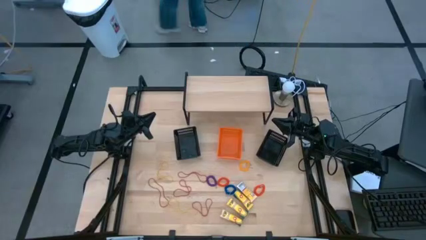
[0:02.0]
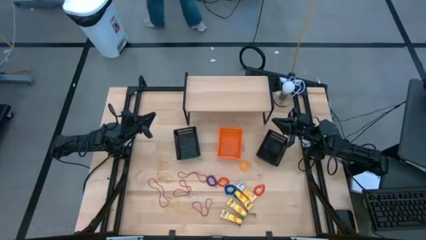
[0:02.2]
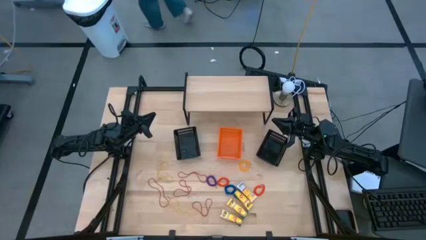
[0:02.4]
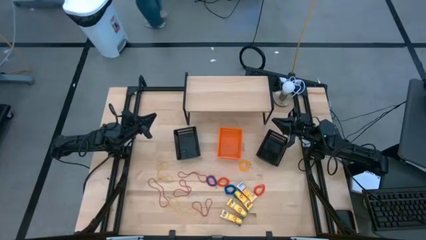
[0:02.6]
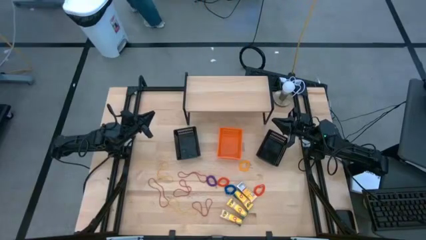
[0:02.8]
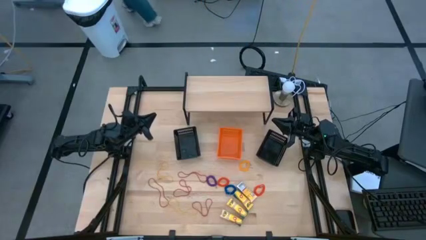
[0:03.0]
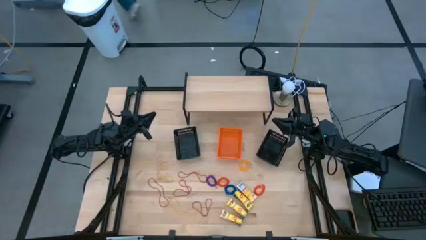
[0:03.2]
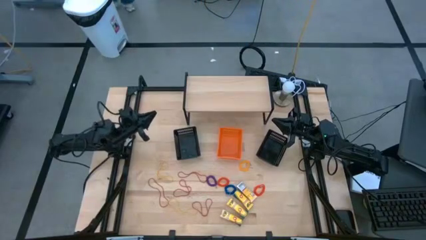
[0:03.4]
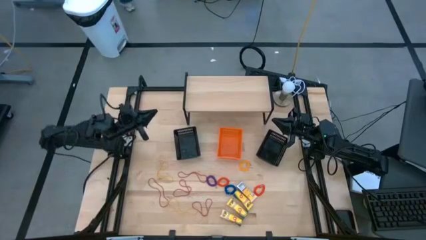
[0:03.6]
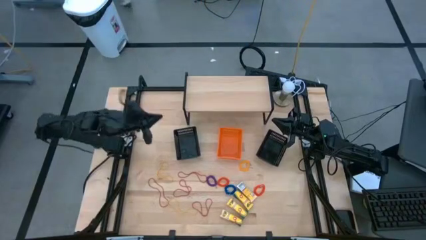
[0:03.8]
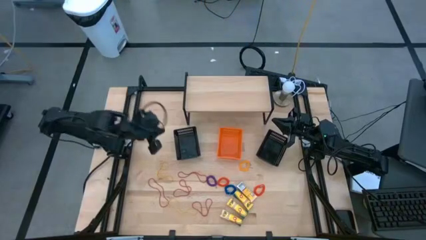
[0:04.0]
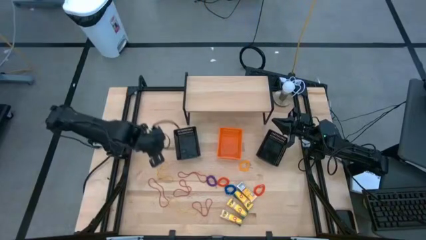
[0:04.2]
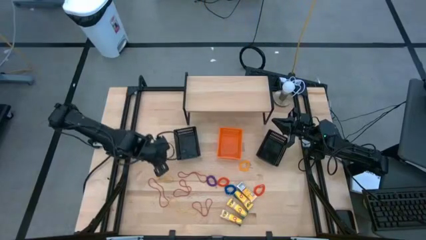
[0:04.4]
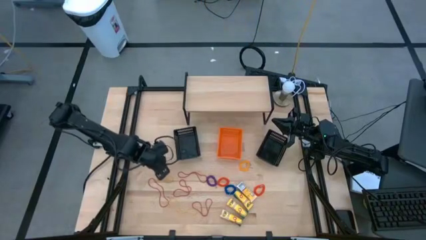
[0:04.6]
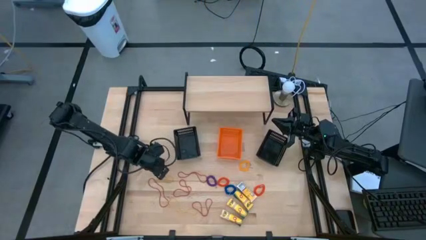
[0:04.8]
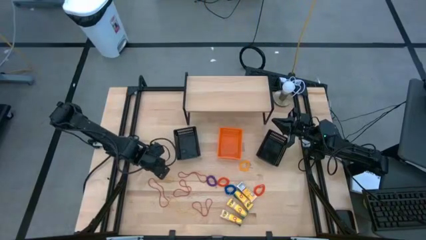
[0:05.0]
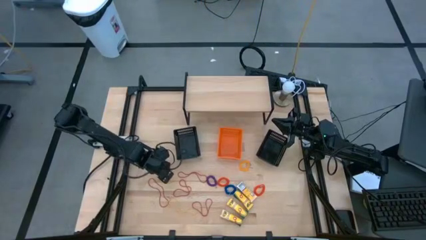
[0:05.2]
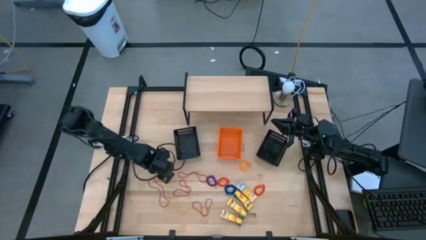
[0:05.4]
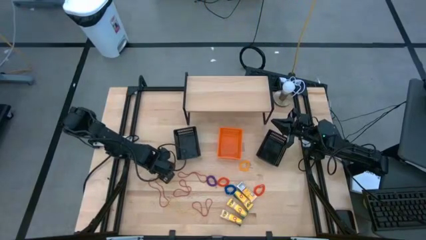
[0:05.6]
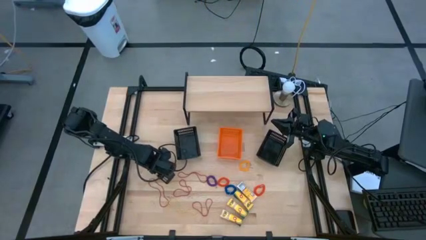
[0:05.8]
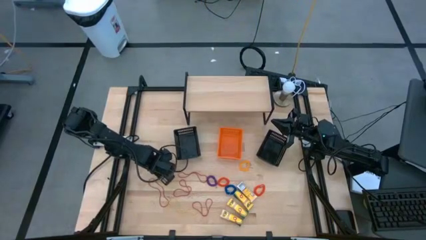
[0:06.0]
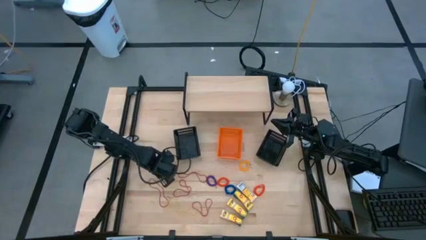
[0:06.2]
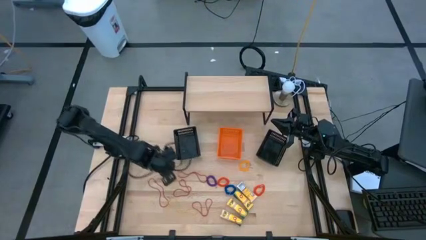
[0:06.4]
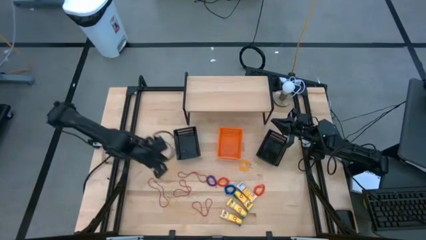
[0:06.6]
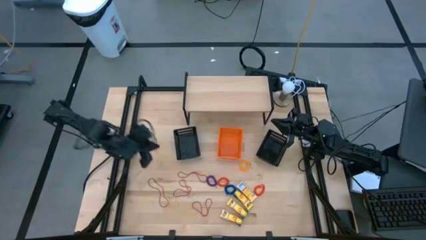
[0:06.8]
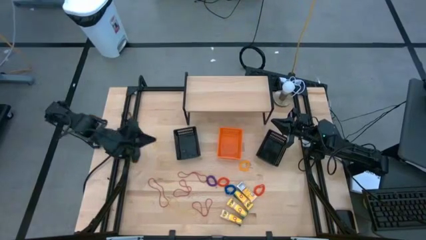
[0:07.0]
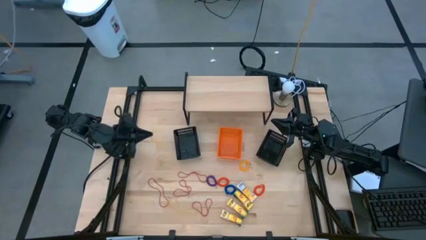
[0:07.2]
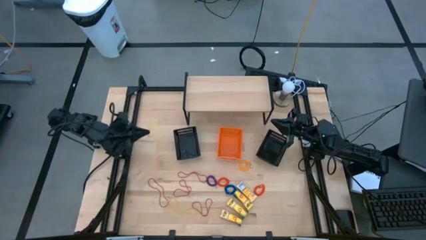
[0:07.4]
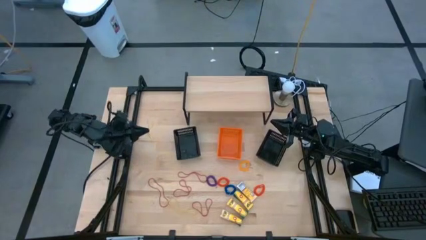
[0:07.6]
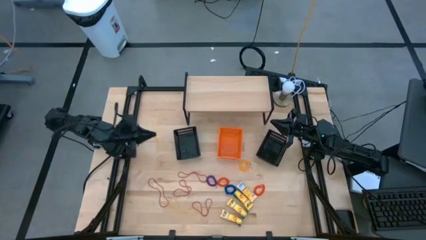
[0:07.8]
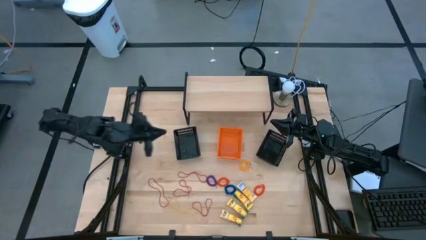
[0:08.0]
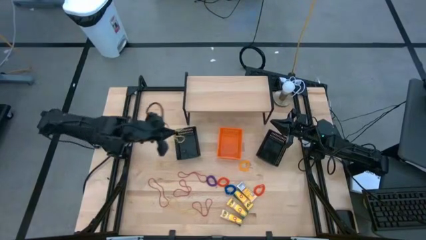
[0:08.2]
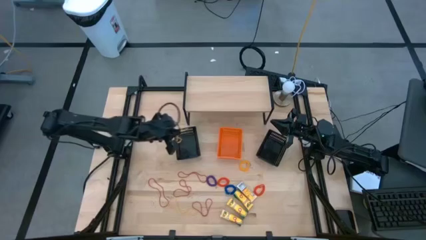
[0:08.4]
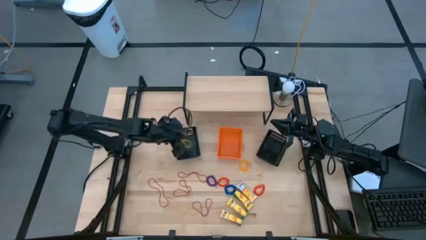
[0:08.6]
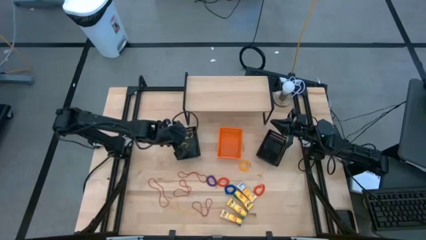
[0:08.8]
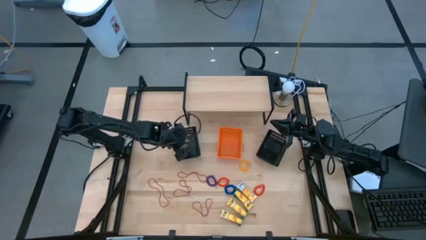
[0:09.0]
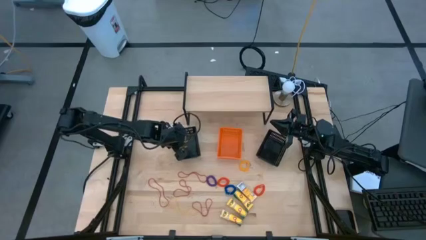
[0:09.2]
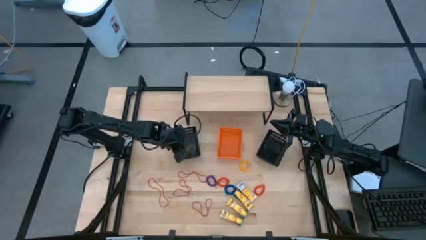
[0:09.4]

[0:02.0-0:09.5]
Task: Pick & Place Office Desk Supplies
Put the yellow rubber band into the left black bin

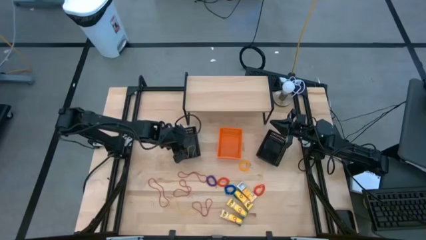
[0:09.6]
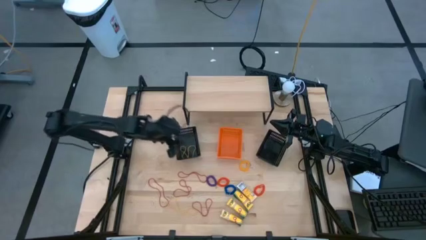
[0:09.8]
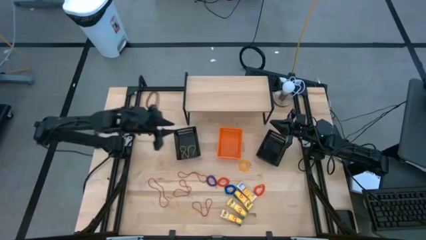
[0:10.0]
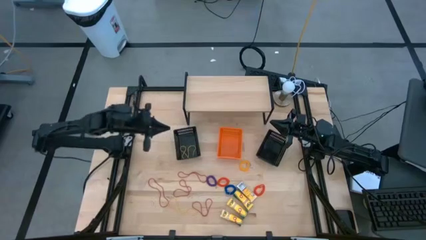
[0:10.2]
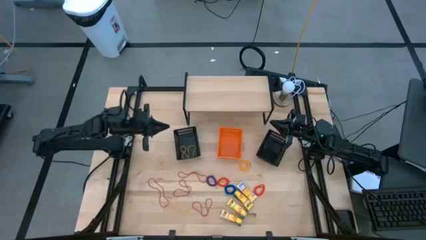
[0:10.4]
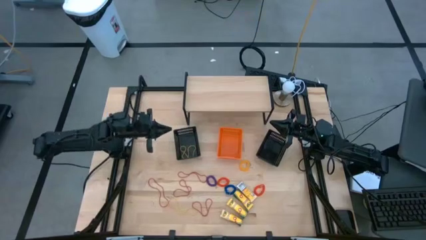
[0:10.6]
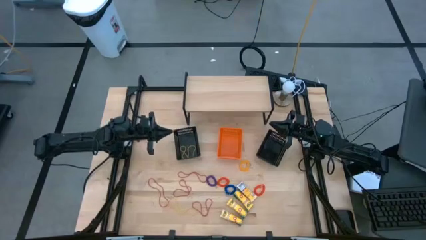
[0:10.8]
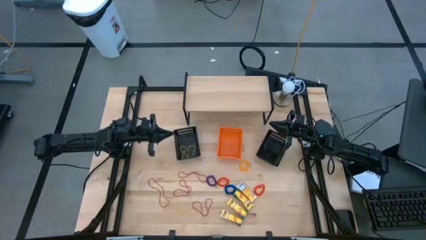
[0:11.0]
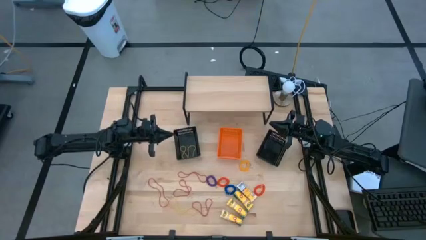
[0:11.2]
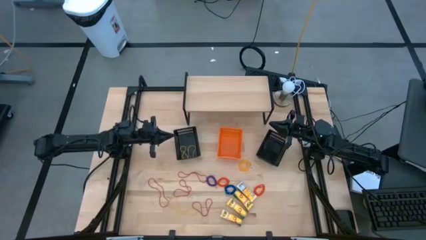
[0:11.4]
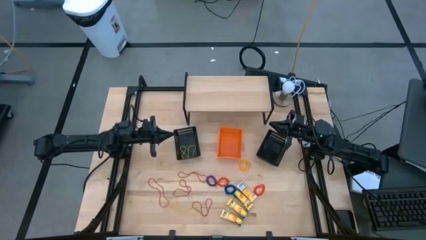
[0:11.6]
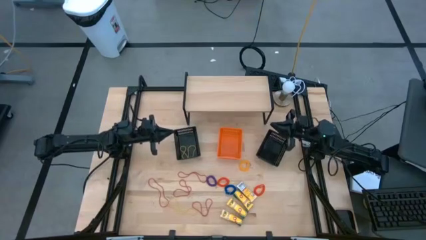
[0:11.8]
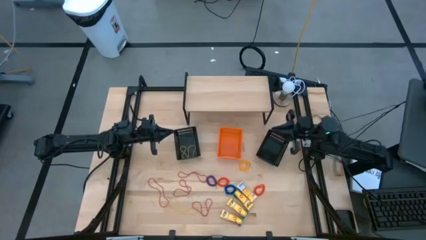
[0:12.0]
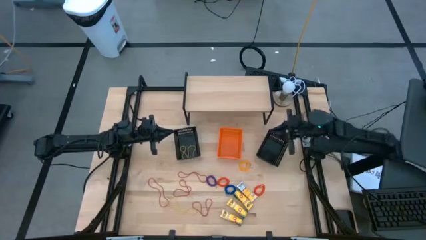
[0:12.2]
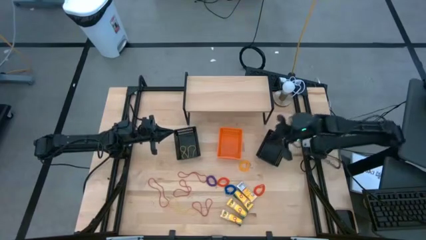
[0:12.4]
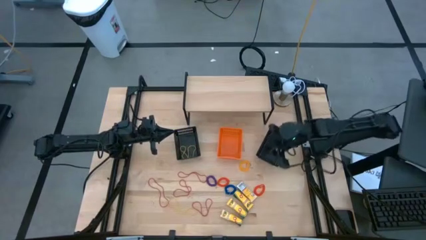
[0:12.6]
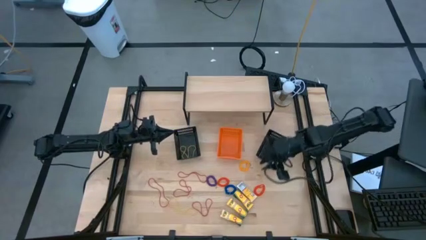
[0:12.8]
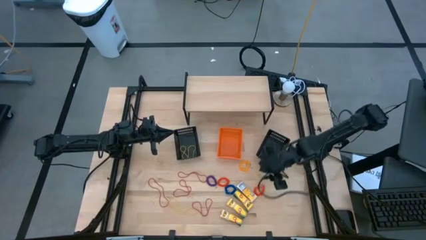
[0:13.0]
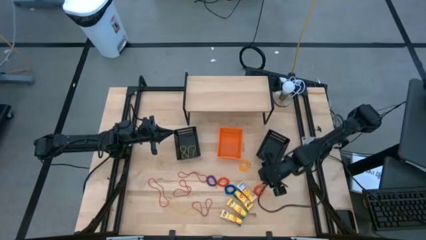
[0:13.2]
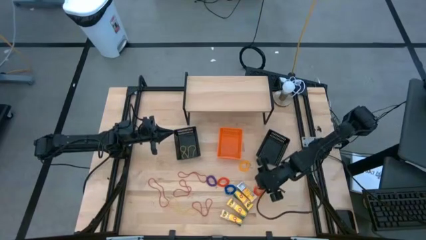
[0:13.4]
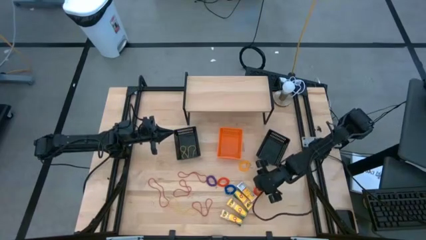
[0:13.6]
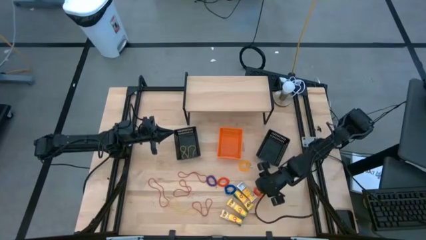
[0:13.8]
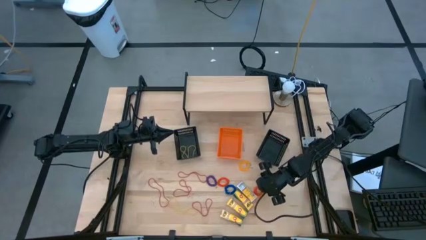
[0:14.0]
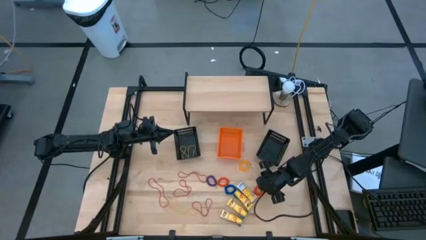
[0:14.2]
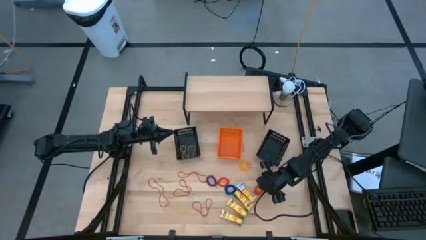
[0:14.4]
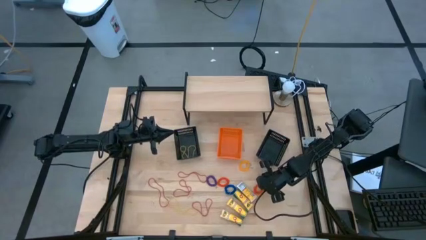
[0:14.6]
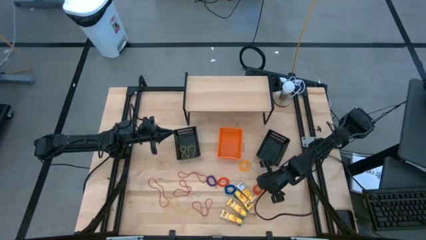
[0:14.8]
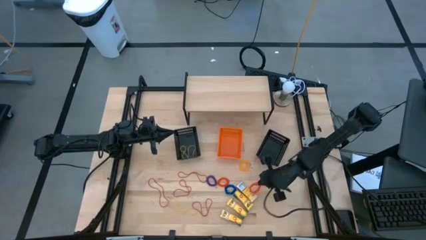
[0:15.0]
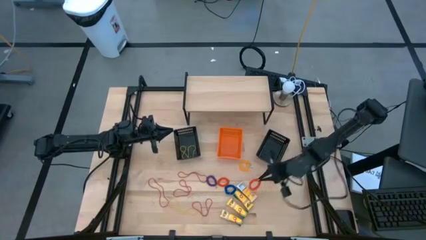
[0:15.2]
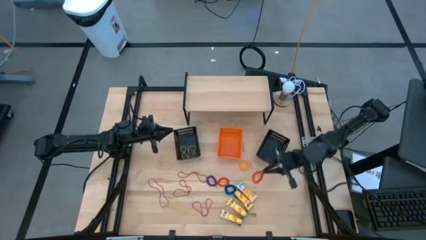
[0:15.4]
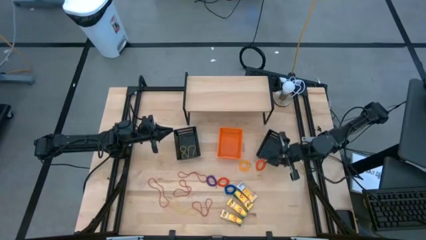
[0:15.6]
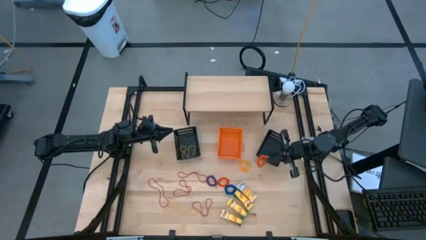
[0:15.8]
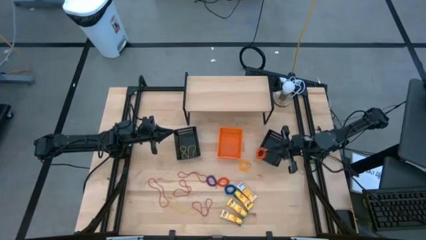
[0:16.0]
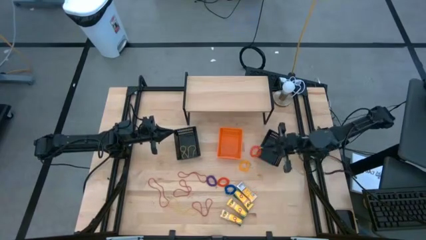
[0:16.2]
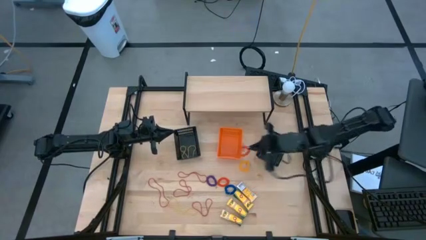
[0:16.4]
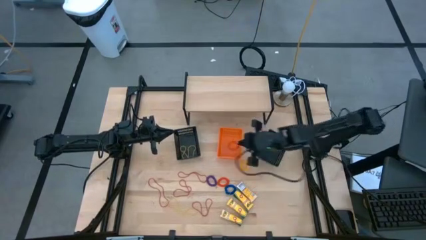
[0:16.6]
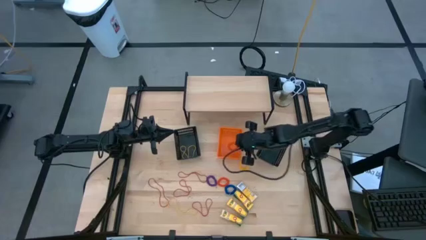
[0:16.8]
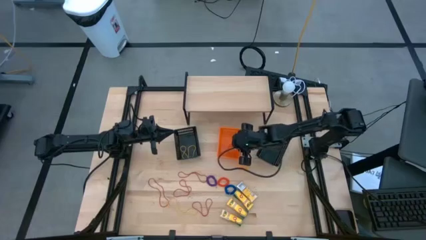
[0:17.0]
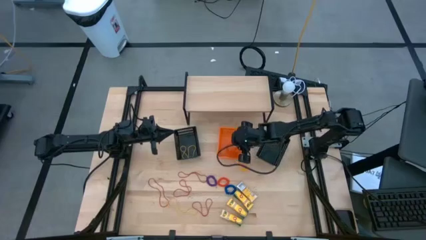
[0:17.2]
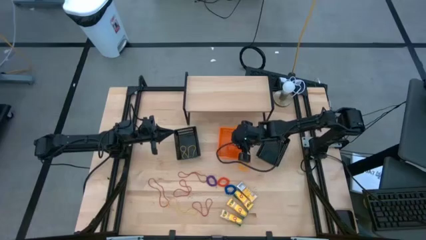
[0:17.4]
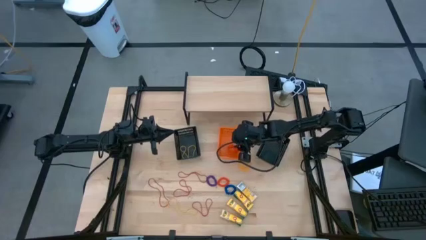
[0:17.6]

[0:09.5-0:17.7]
Put the orange spring keychain into the orange bin

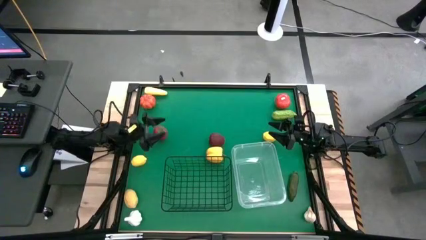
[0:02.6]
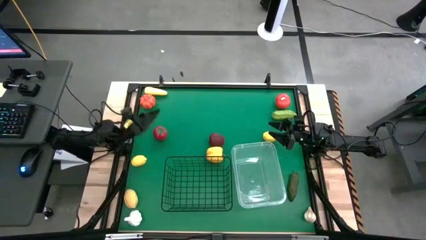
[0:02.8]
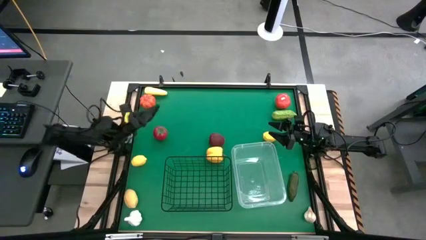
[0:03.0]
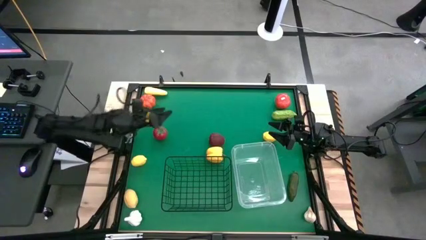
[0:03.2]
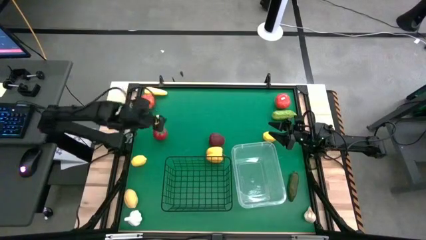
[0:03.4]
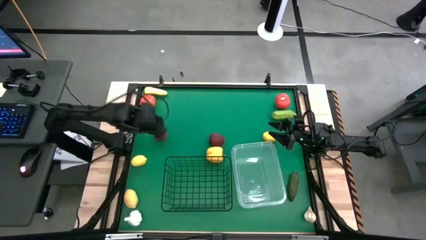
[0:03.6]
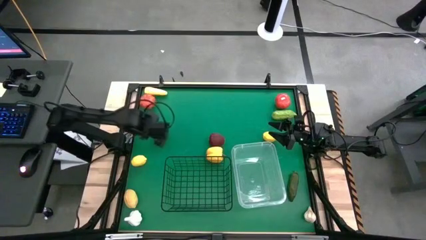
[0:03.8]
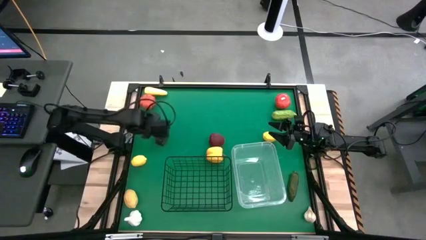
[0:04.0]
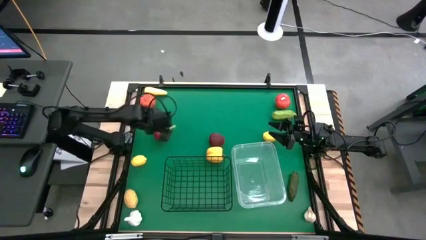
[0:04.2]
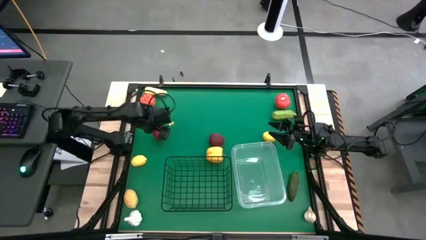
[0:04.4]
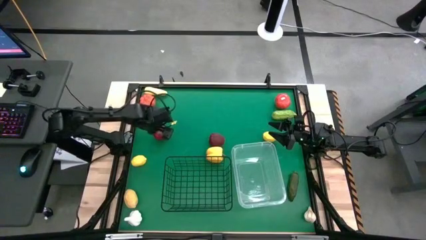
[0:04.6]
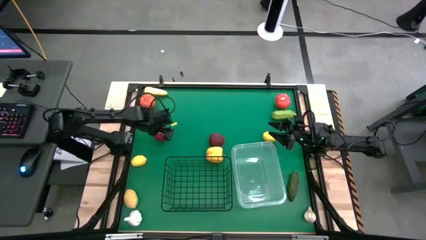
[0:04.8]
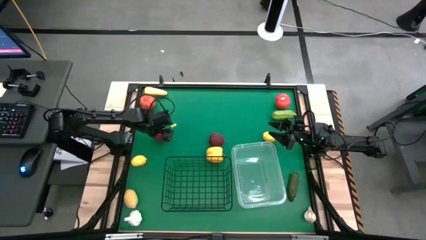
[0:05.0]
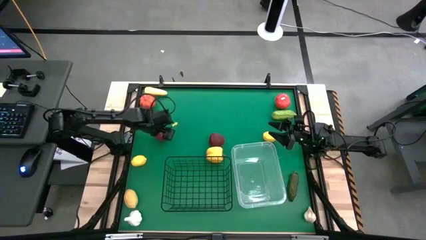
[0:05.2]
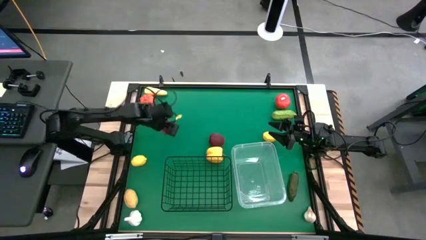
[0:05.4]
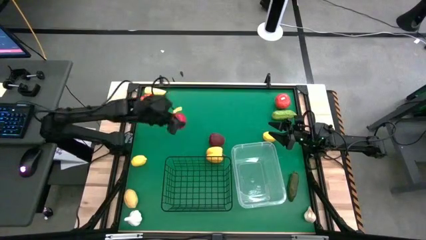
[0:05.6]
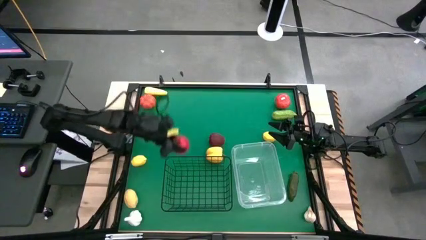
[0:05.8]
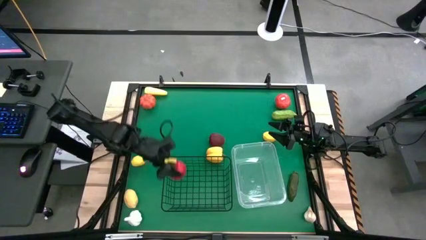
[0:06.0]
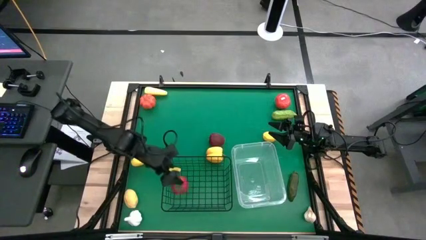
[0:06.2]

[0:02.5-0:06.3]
Task: Sort produce into baskets
Put the left tomato into the wire basket
